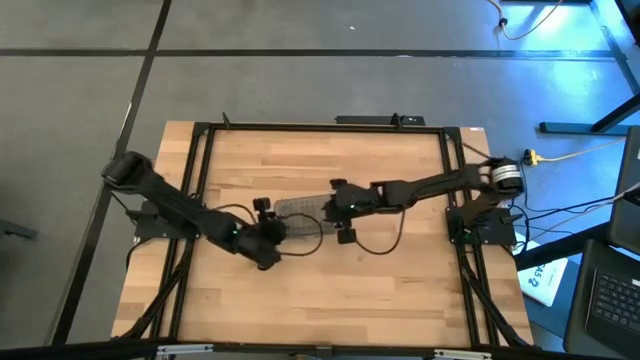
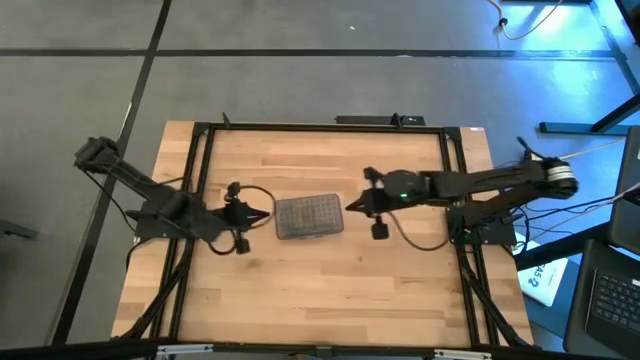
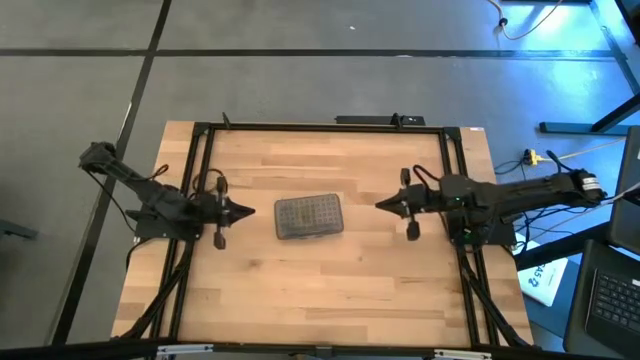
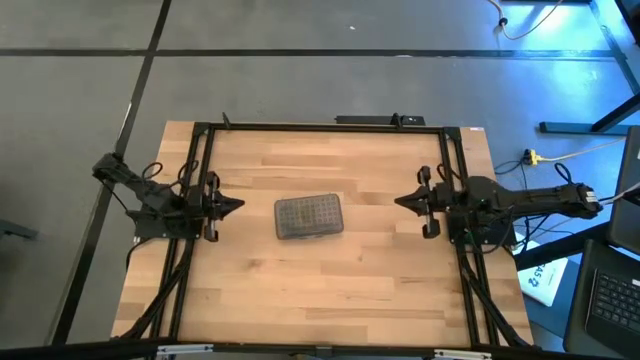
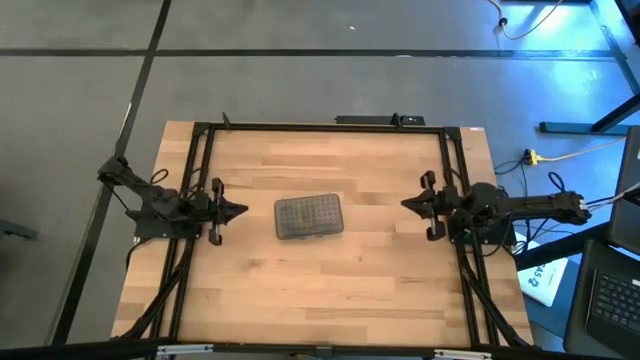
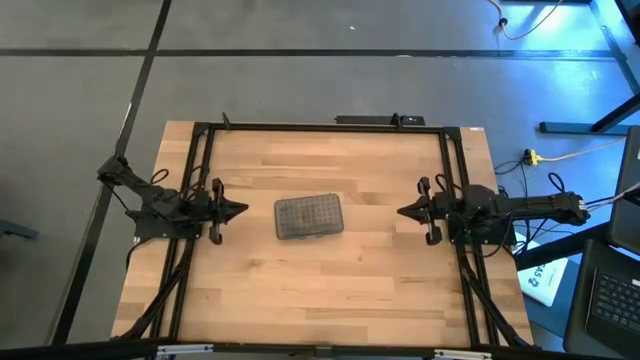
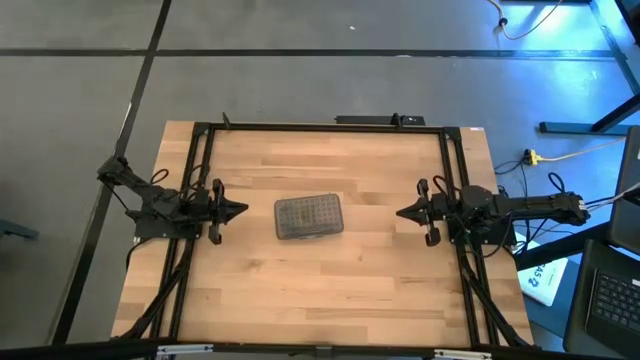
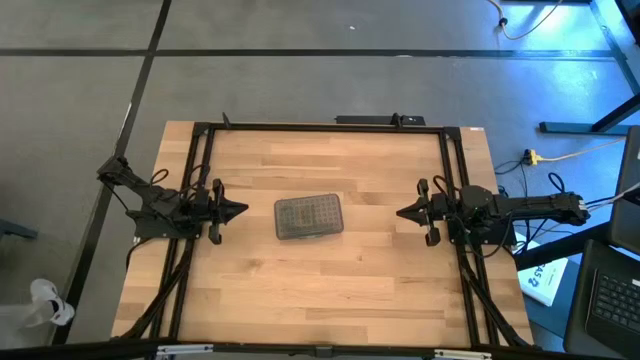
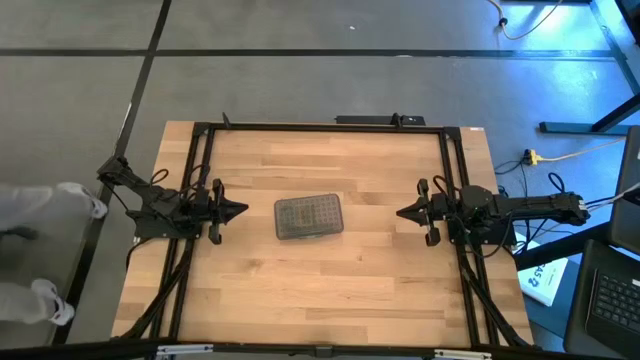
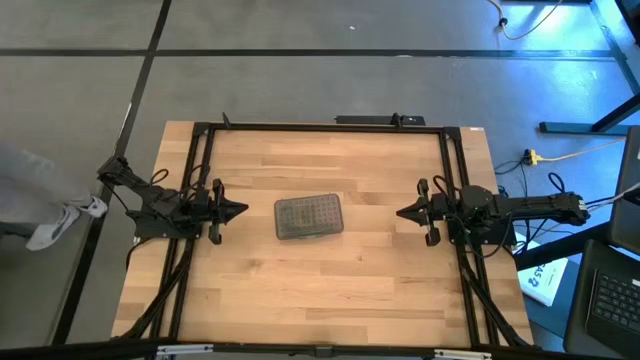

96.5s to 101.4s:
Task: Pack school essentials
Return to Home Position

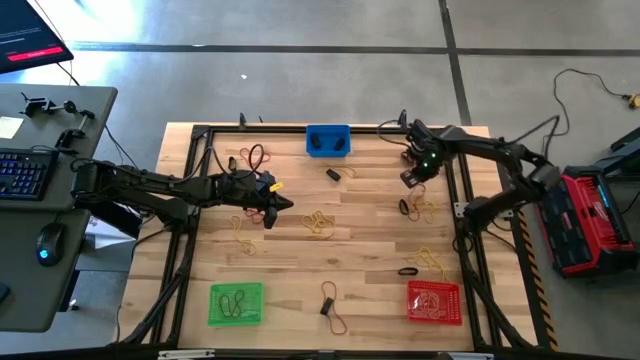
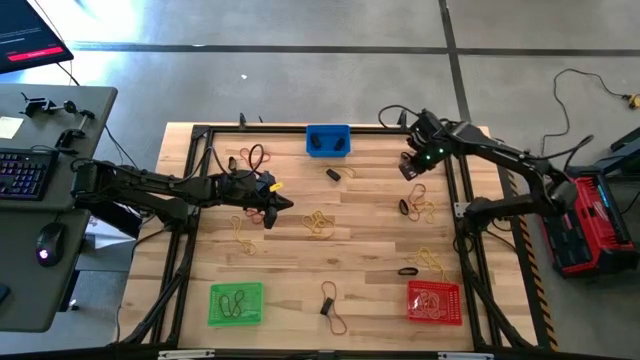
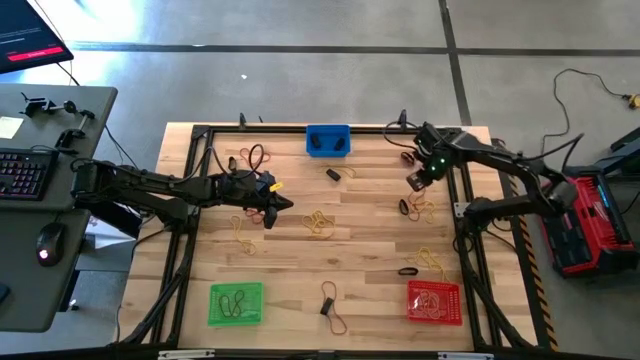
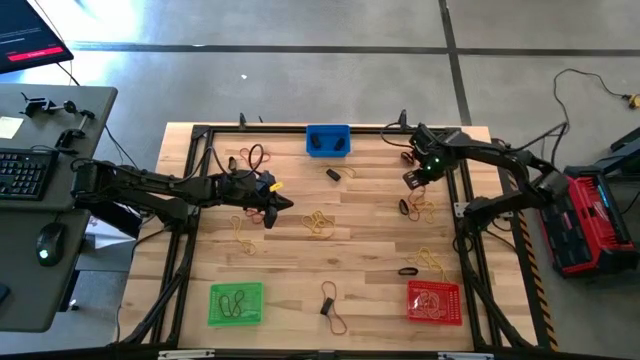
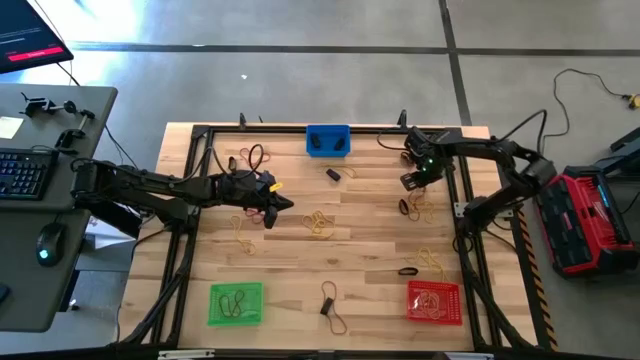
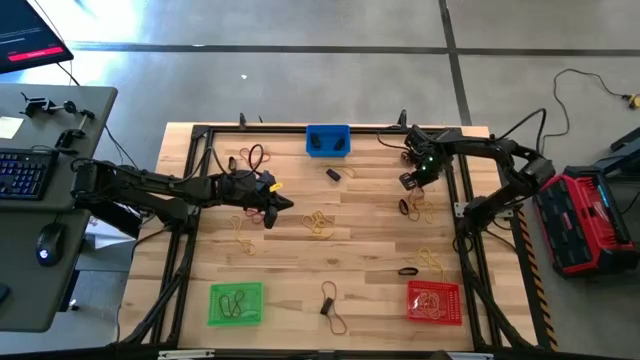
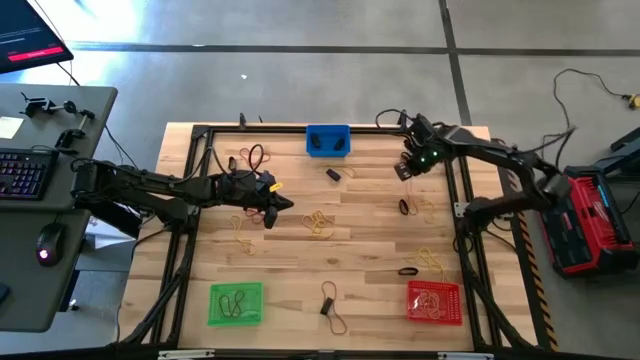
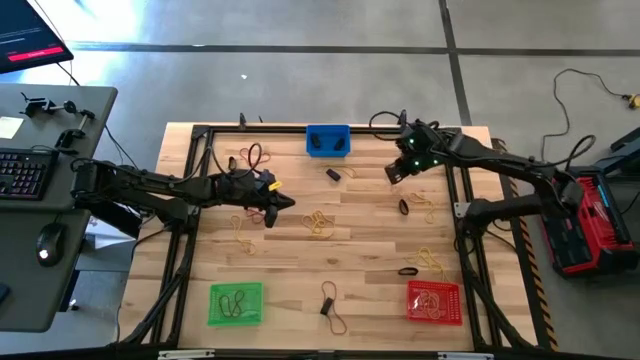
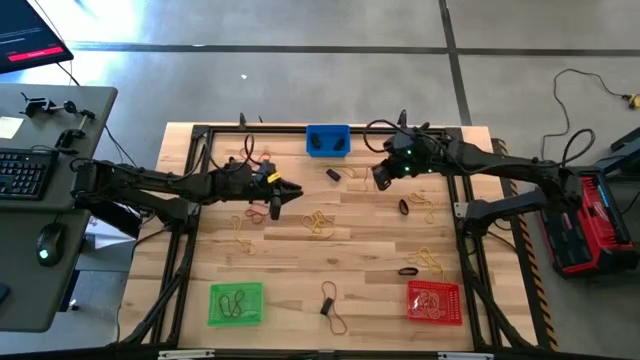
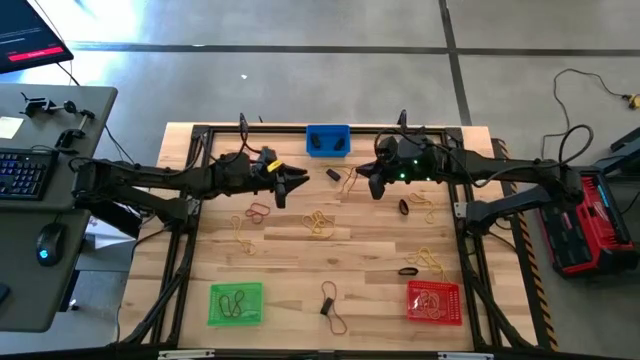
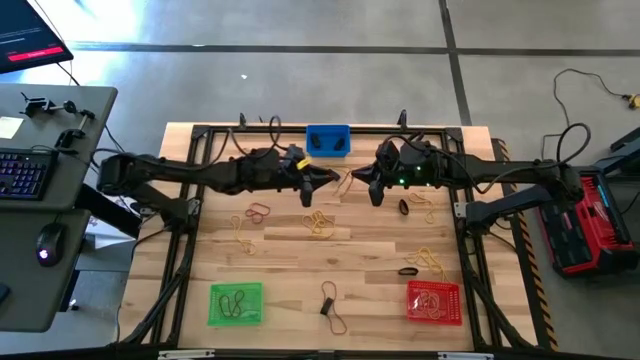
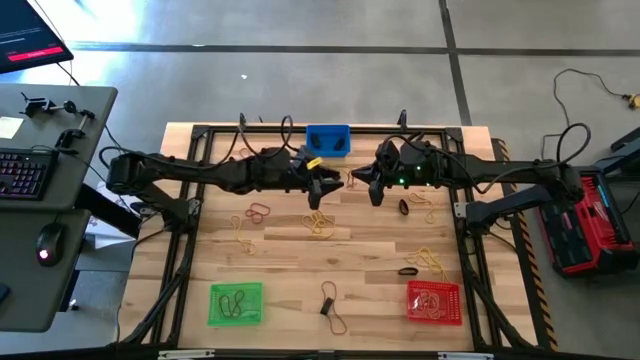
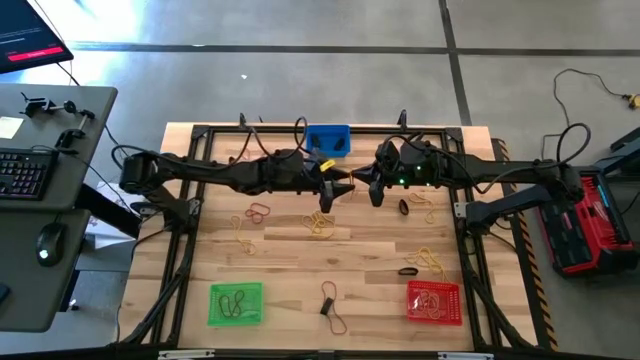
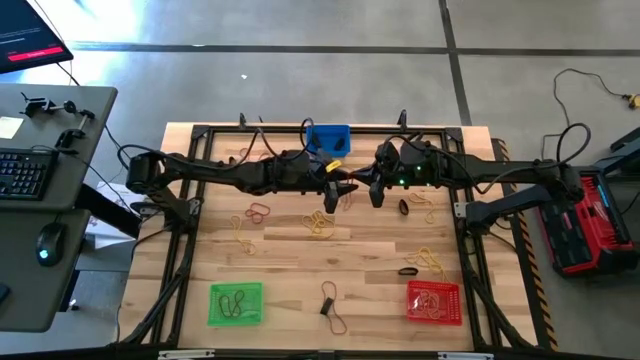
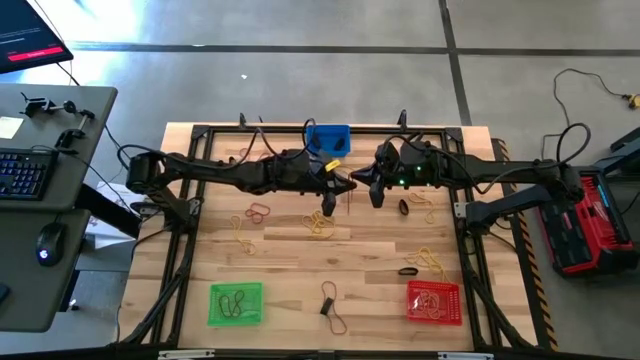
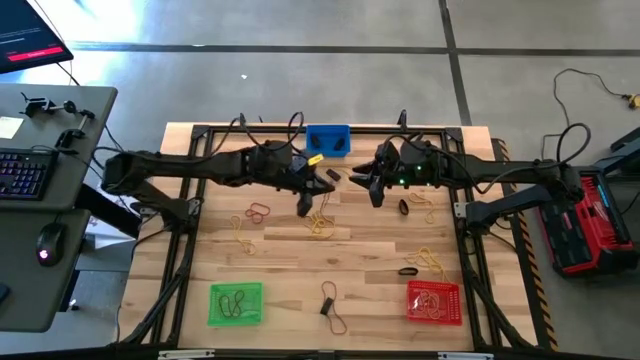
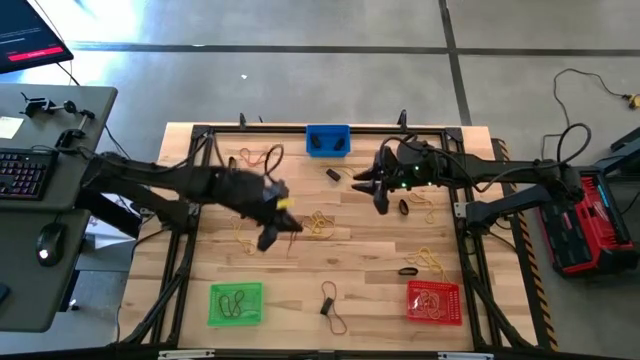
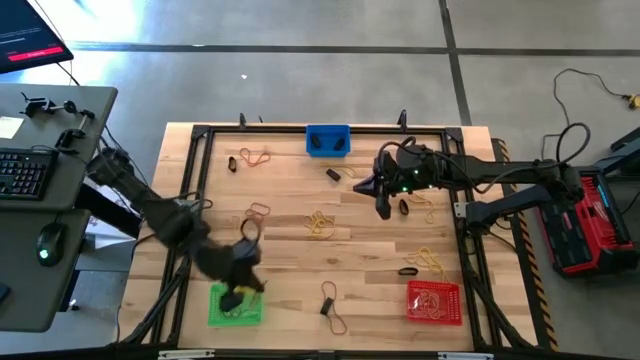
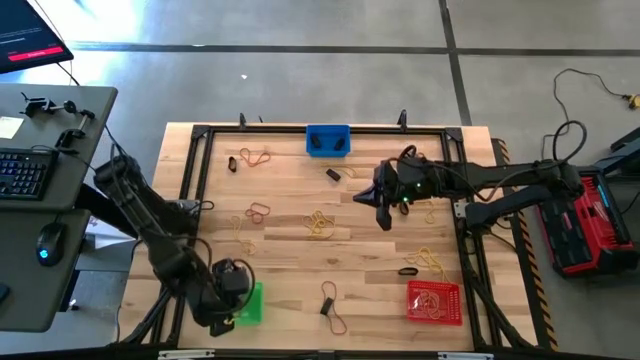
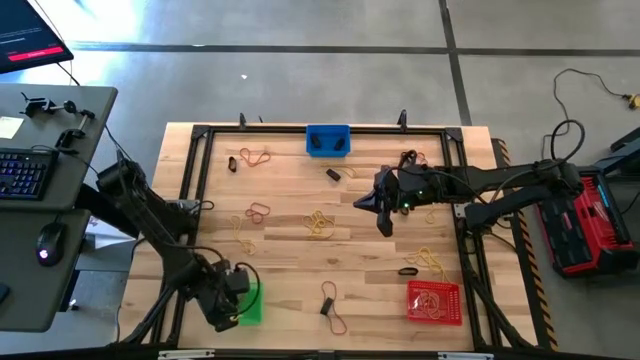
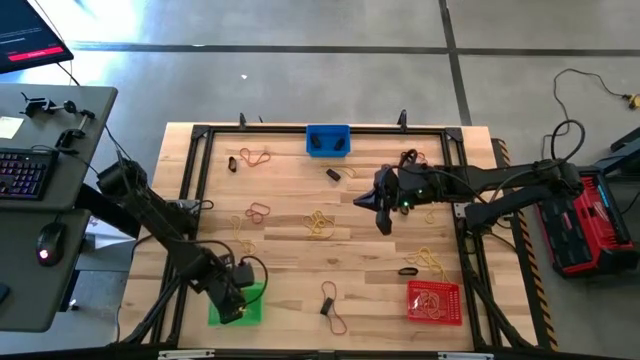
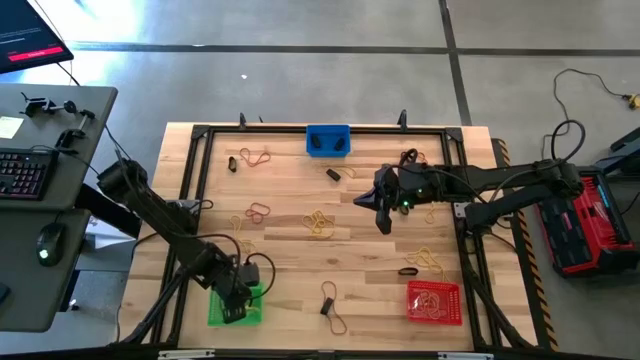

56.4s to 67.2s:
Task: Sort rubber bands into baskets
Put the red rubber band into the green basket
